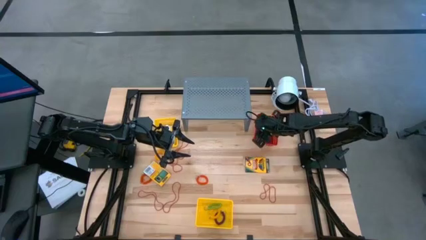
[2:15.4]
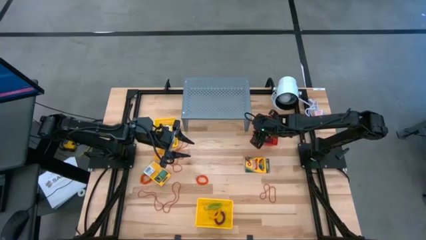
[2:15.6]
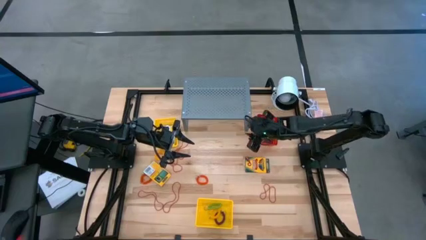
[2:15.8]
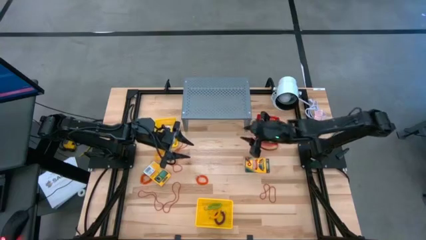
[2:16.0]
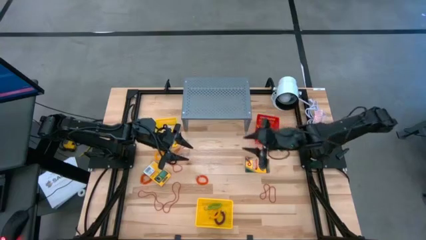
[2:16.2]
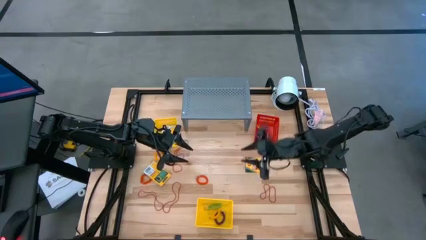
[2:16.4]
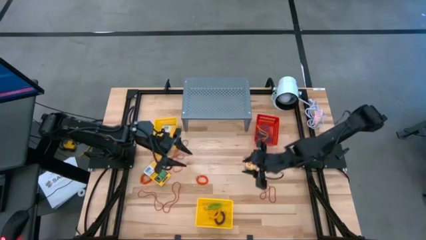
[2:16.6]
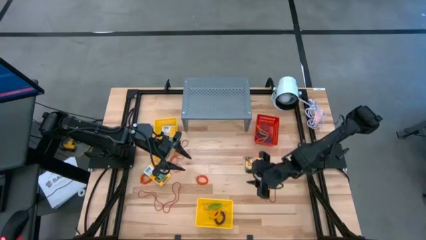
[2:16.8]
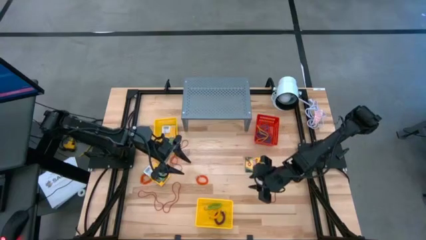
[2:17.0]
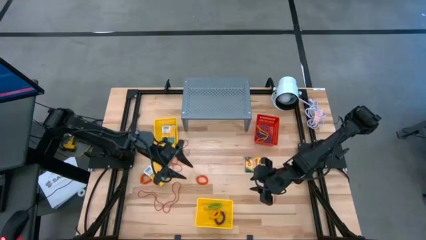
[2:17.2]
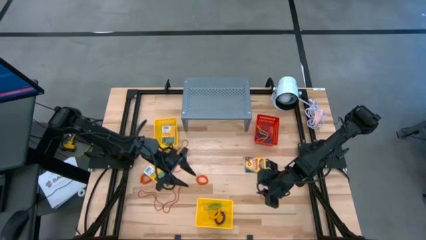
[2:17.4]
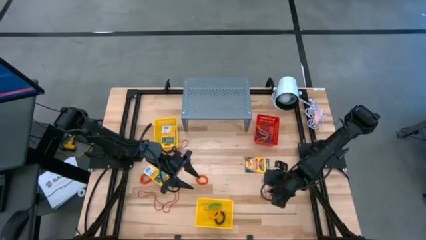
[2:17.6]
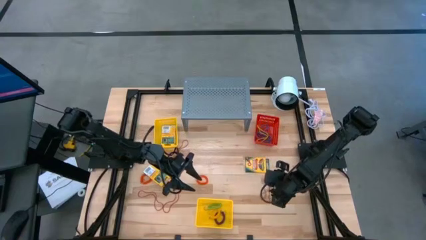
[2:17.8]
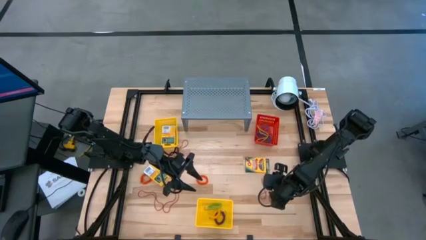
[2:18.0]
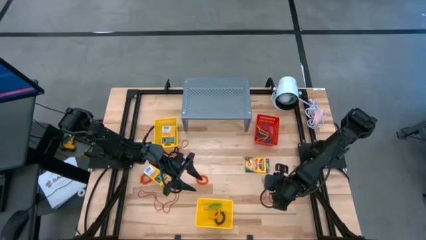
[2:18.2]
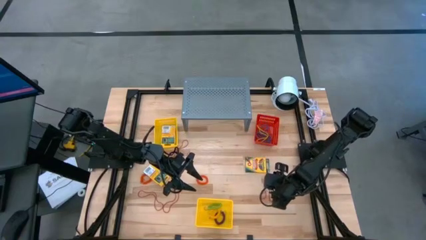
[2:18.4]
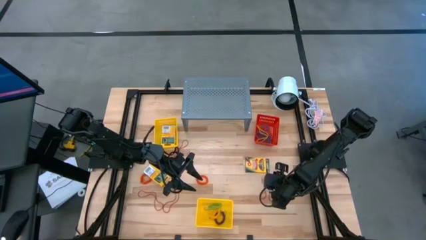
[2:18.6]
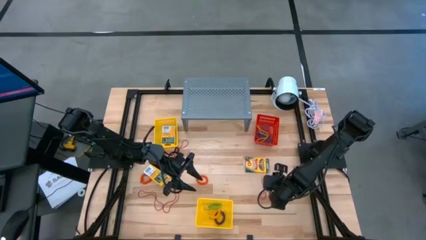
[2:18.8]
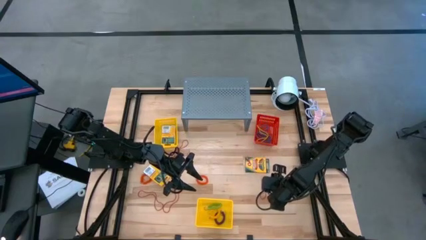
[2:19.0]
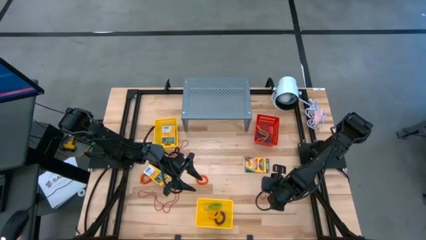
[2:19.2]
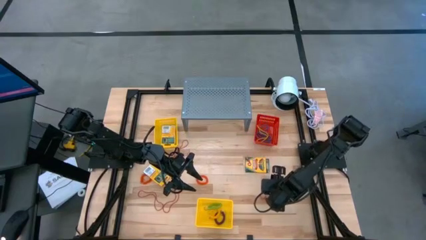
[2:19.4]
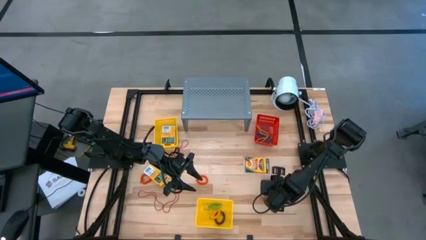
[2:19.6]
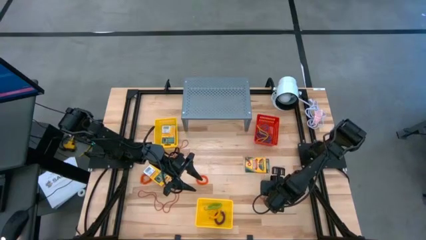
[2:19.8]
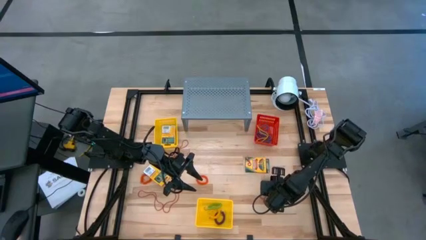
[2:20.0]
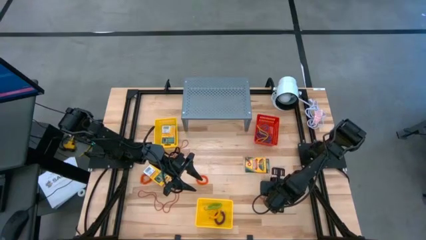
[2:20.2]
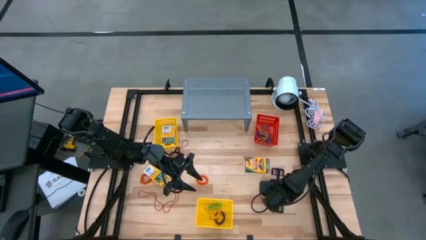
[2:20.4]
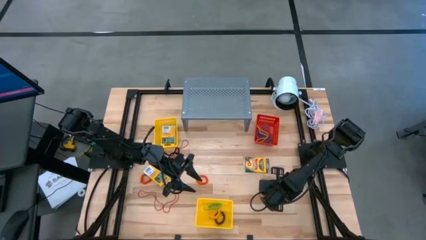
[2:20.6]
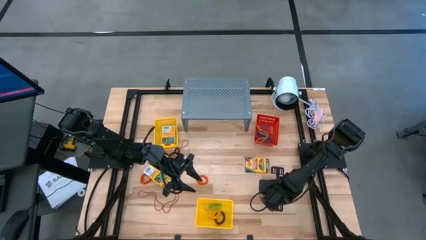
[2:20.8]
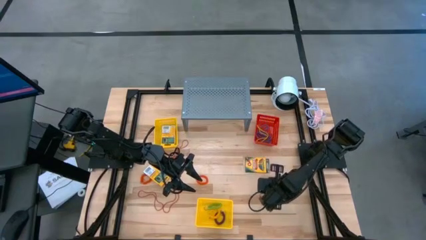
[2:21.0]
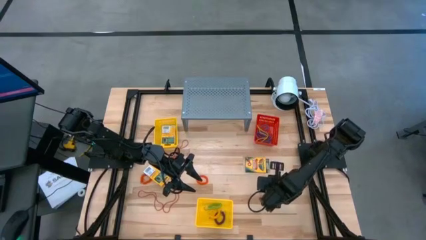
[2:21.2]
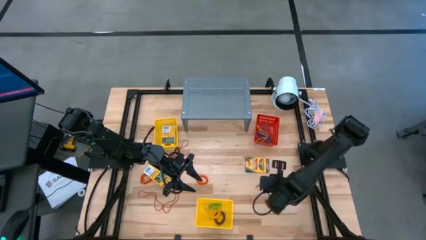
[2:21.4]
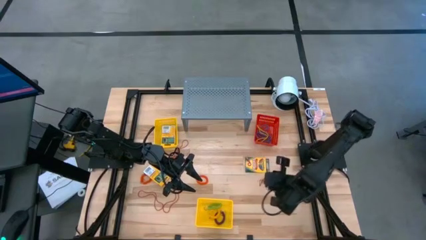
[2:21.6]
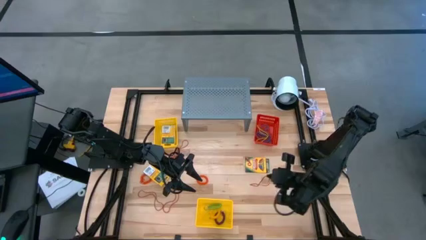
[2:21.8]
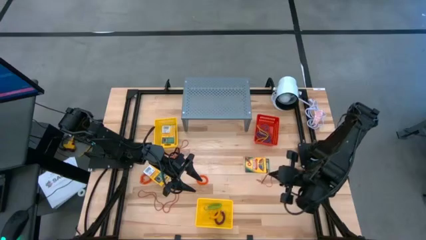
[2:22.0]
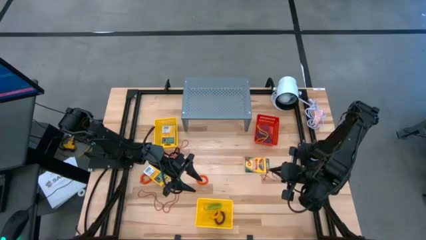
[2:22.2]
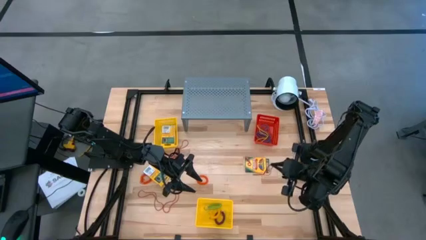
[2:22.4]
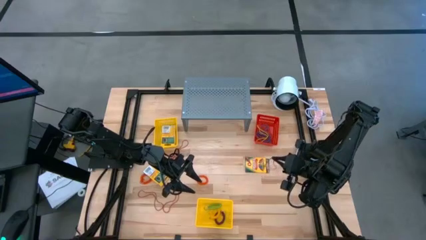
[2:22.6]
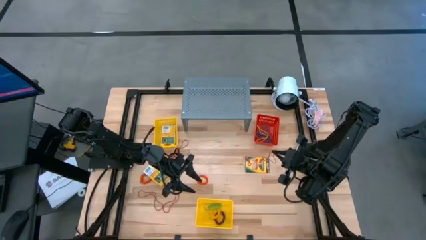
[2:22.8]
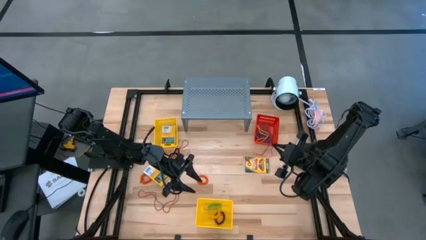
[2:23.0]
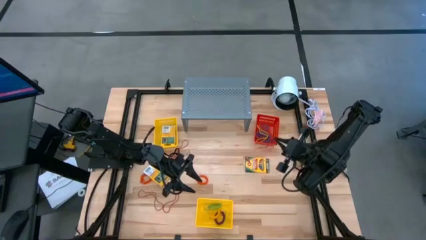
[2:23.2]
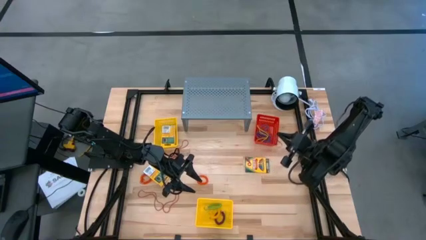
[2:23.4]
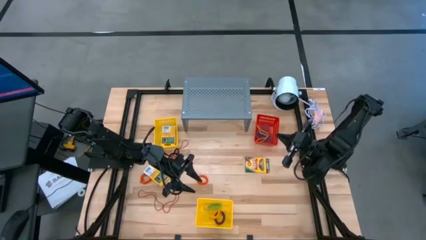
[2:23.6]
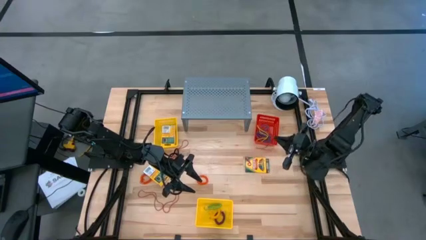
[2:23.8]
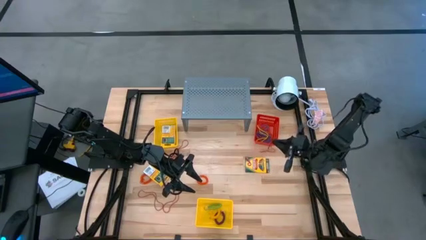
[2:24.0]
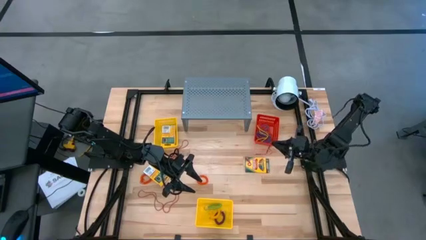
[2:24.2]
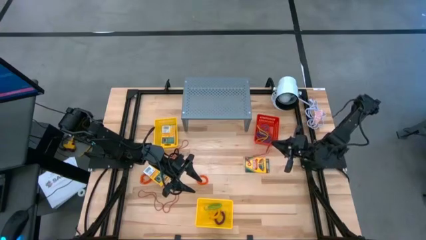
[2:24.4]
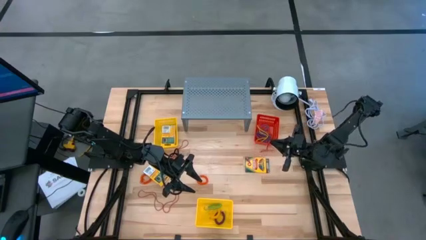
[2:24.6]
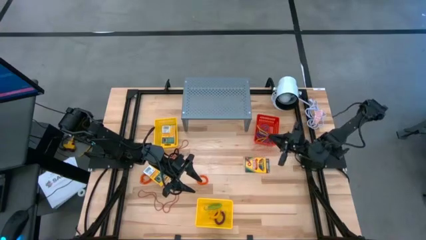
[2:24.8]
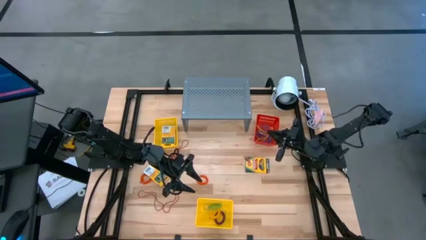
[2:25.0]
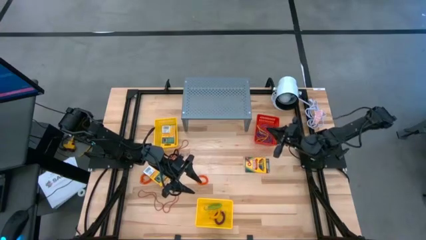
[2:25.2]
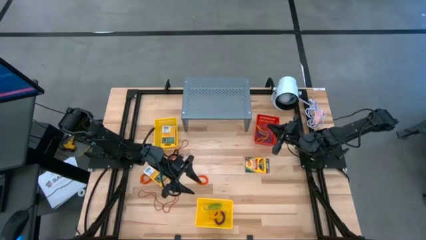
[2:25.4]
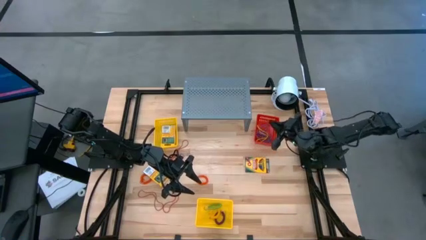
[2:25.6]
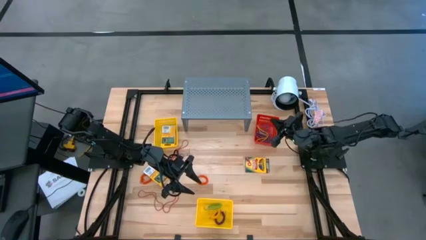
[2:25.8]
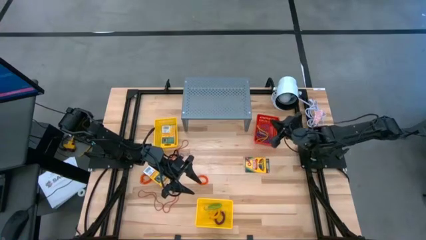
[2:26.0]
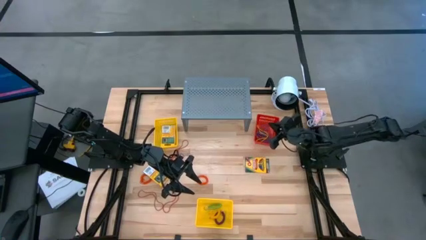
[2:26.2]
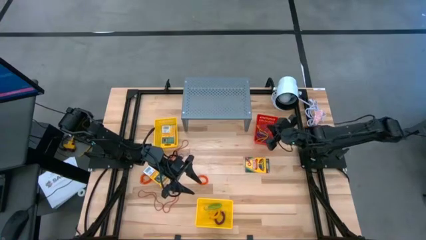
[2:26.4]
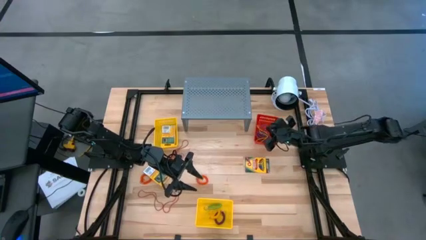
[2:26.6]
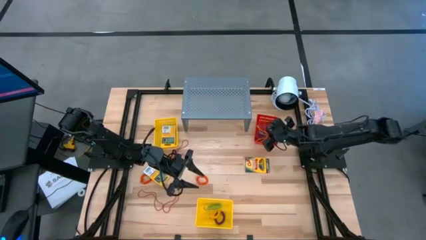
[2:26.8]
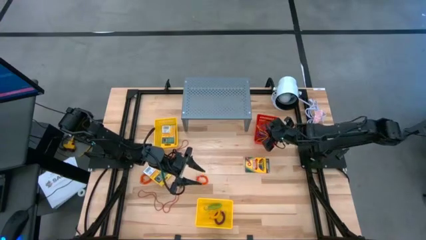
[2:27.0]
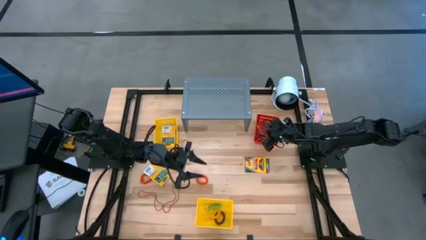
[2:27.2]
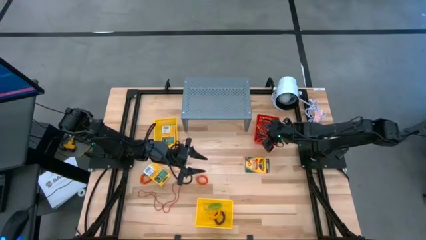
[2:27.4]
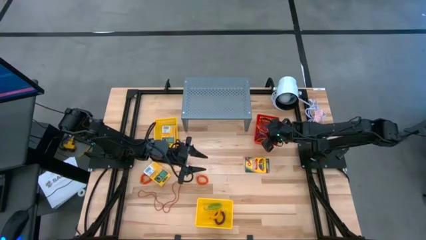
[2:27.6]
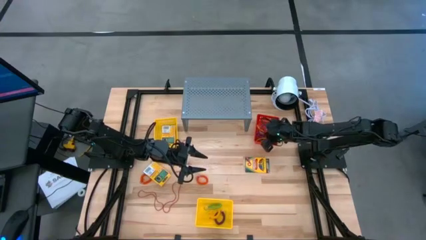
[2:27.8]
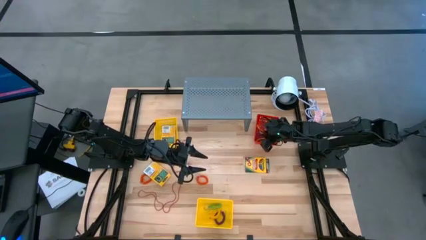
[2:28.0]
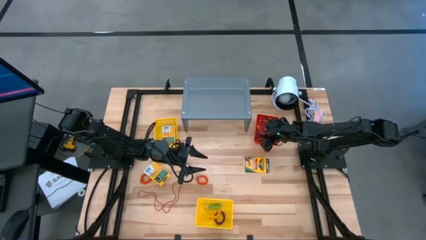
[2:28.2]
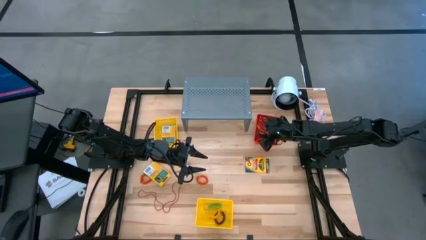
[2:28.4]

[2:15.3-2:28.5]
Task: Pick & Place Office Desk Supplies
Put the red rubber band into the red bin
